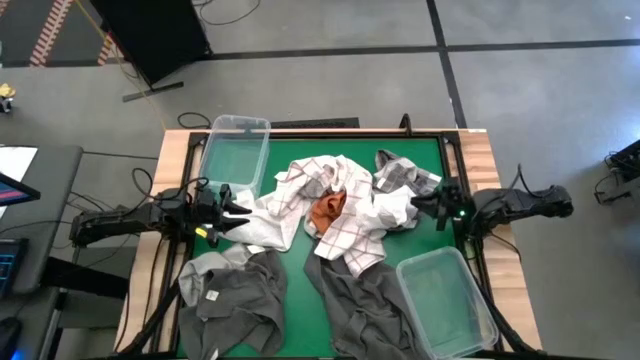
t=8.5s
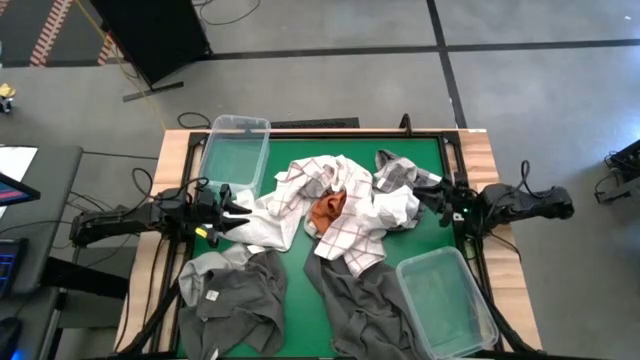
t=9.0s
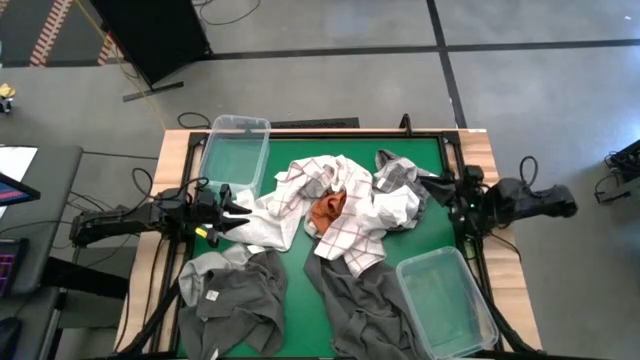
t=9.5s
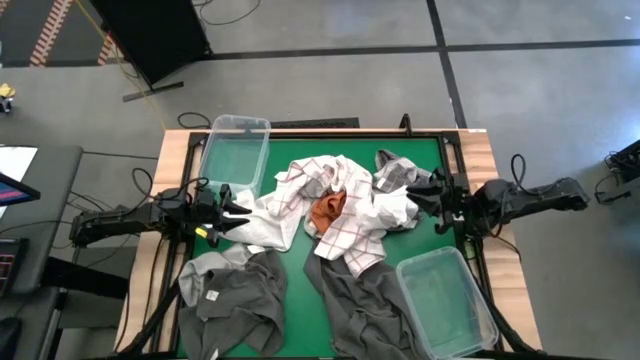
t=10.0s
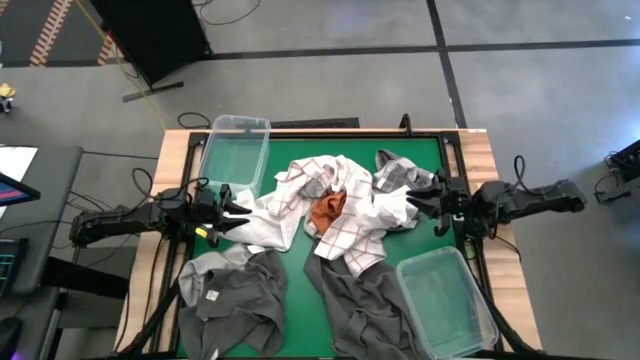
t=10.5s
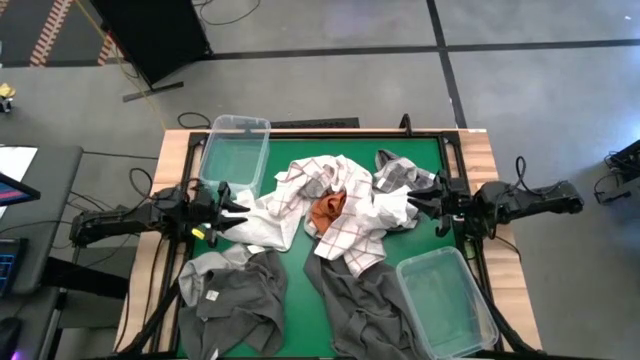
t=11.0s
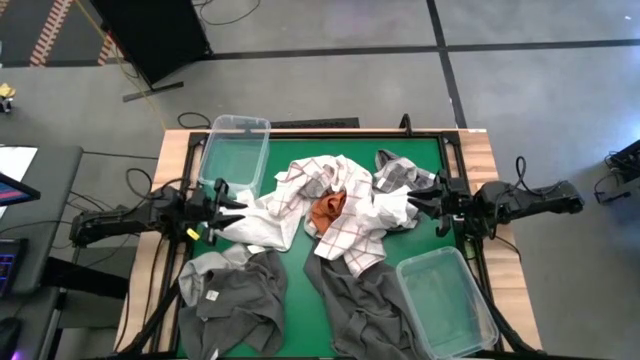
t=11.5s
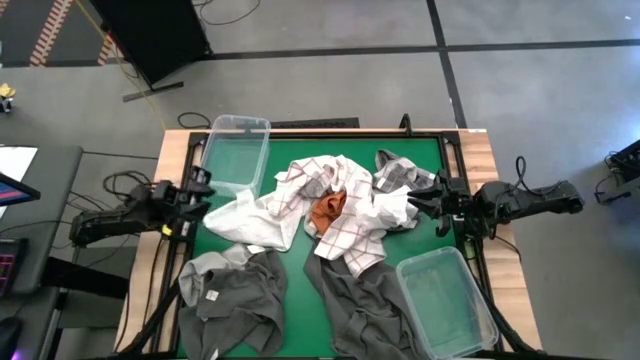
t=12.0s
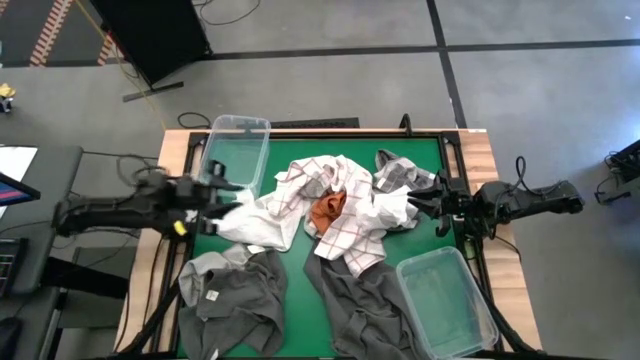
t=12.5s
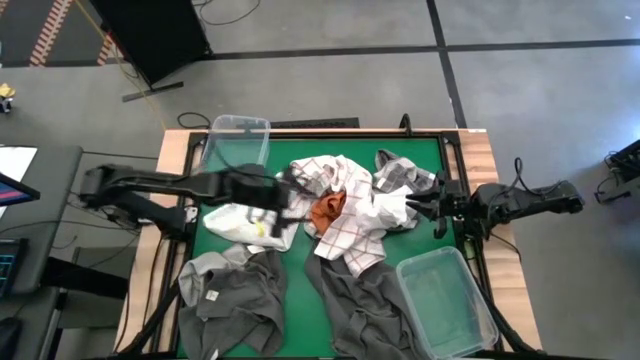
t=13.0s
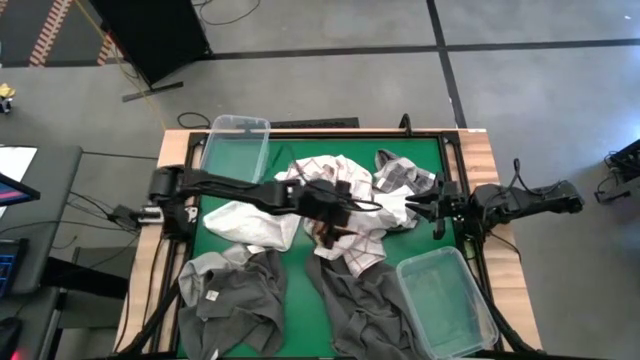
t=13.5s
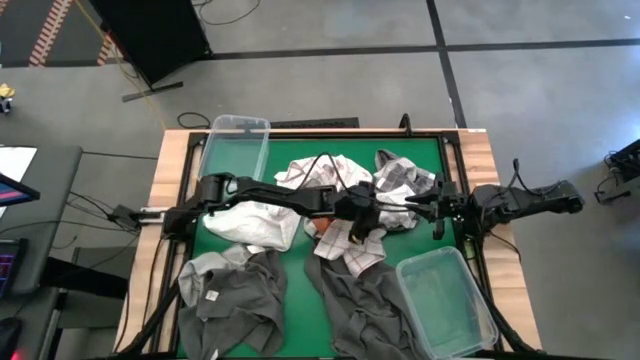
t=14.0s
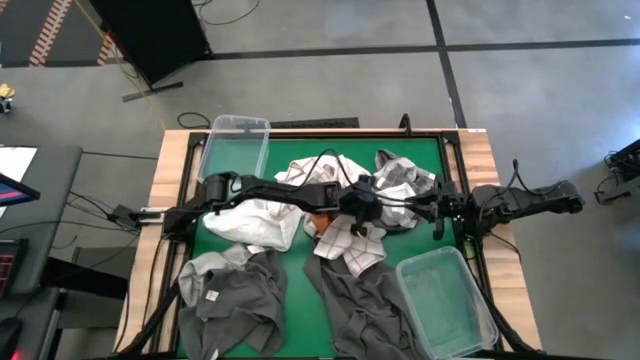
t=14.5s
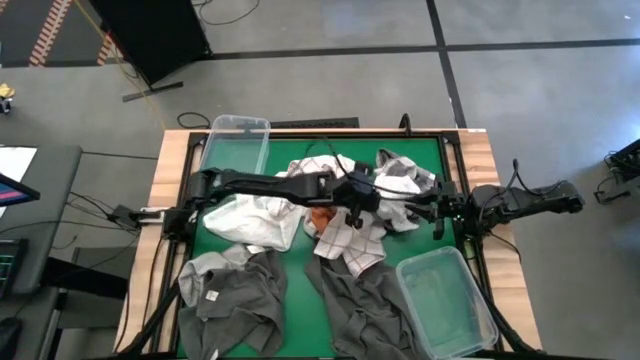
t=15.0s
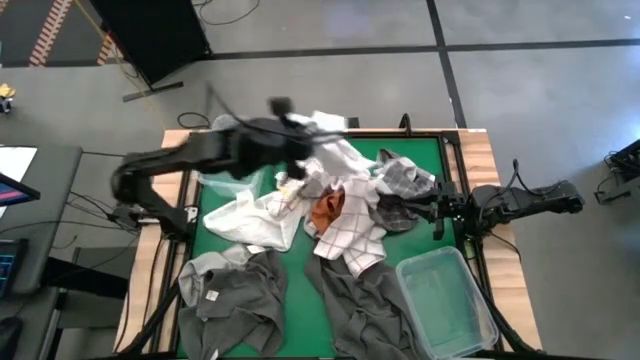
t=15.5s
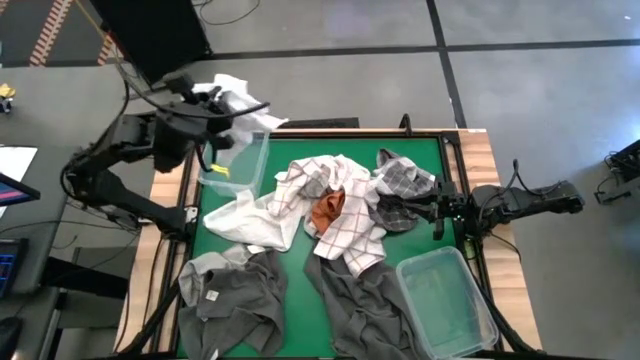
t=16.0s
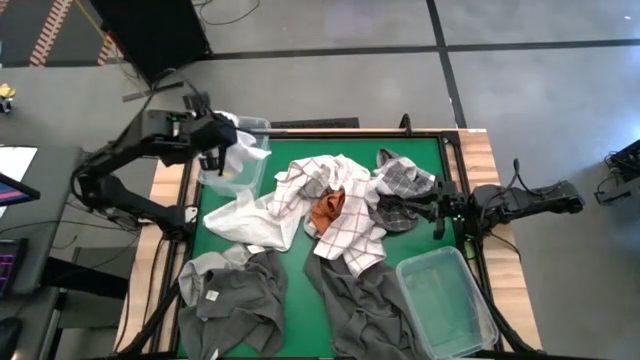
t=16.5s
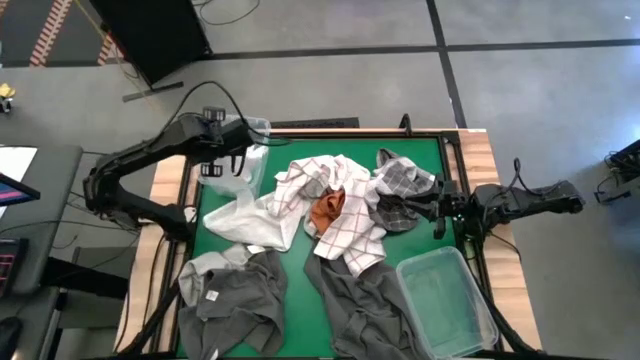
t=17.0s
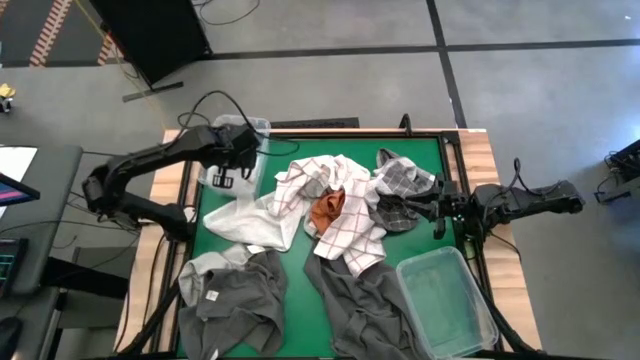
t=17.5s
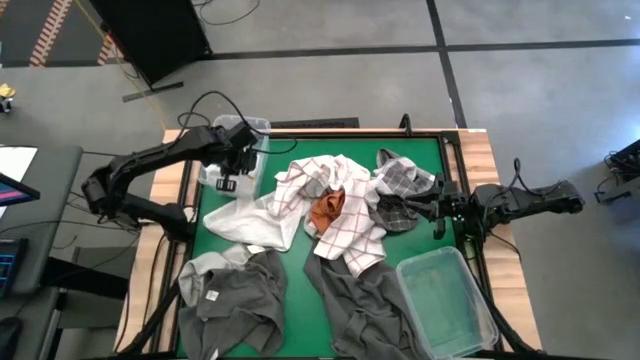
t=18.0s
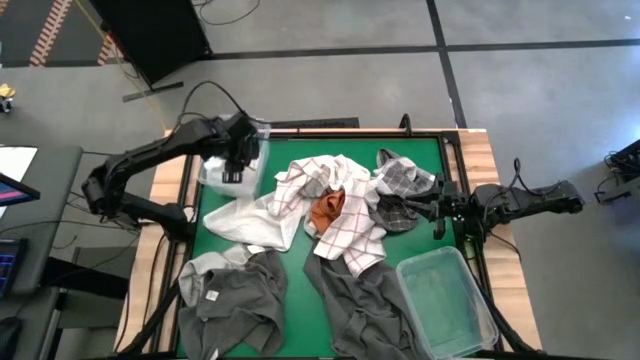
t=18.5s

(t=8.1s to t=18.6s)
Task: Sort towels by color in basket
Put the right white towel into the top transparent bin

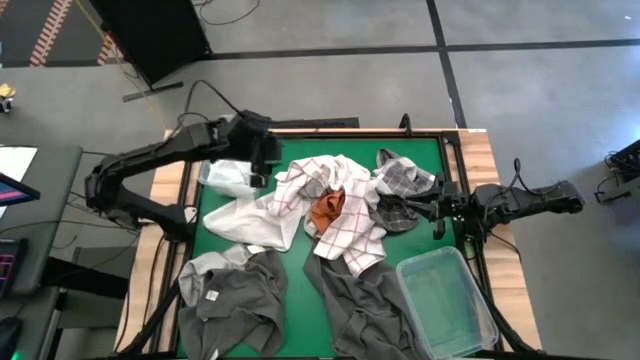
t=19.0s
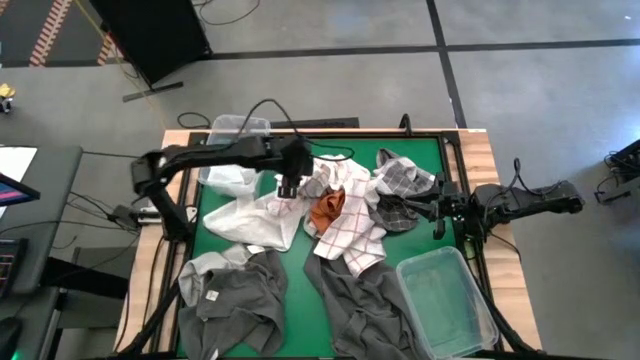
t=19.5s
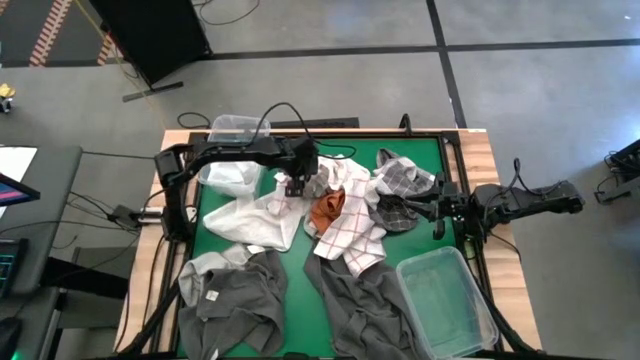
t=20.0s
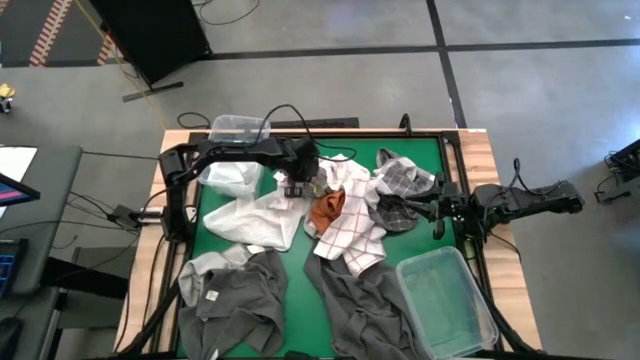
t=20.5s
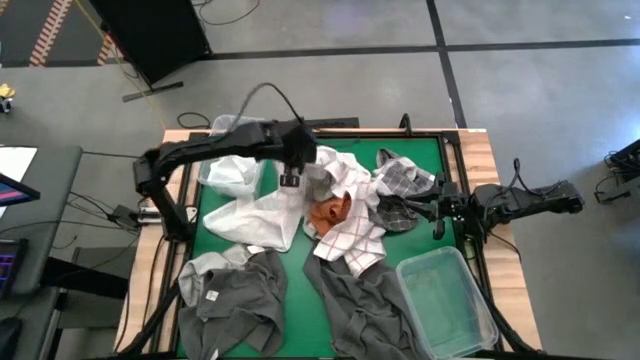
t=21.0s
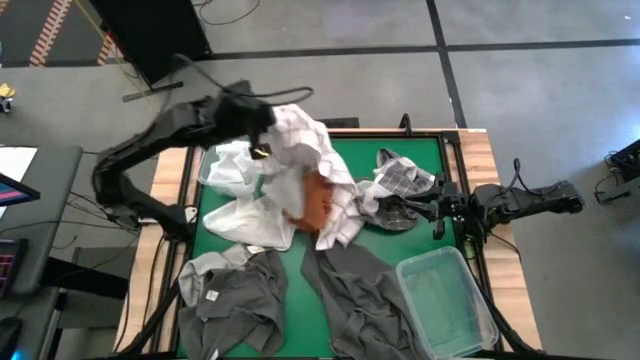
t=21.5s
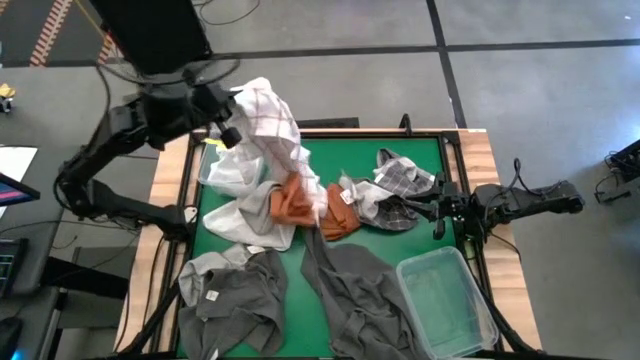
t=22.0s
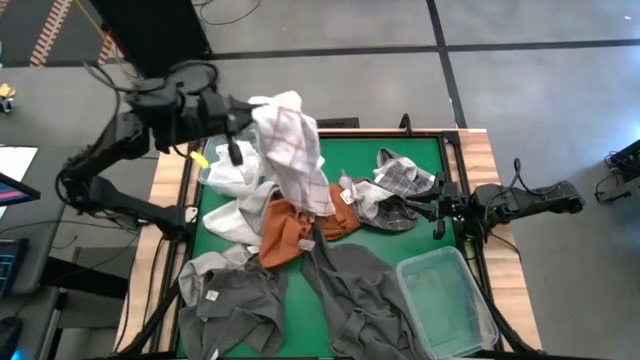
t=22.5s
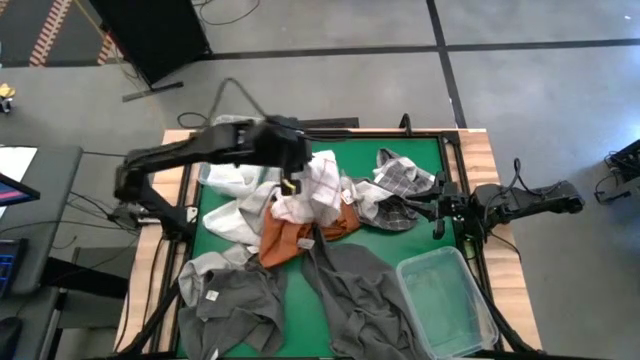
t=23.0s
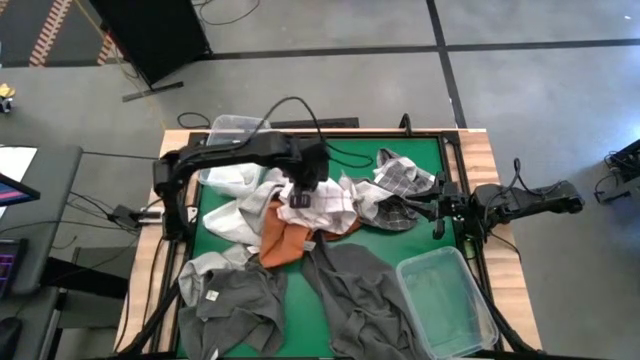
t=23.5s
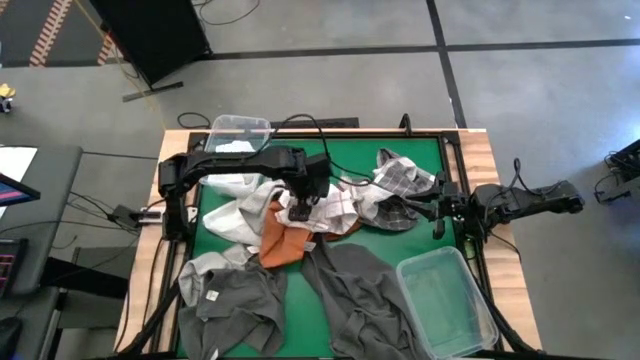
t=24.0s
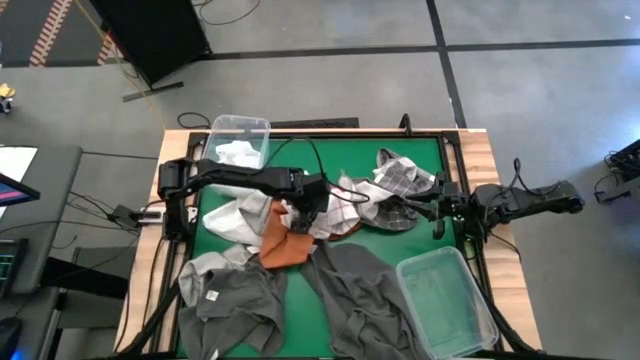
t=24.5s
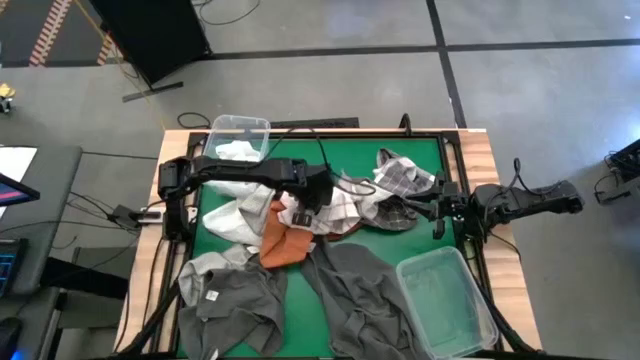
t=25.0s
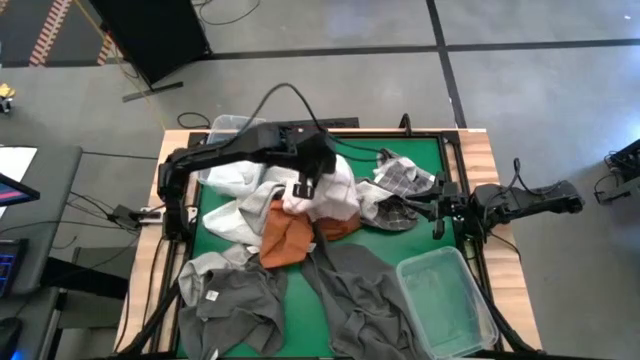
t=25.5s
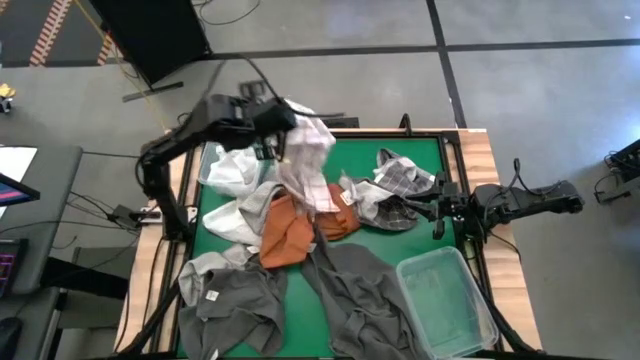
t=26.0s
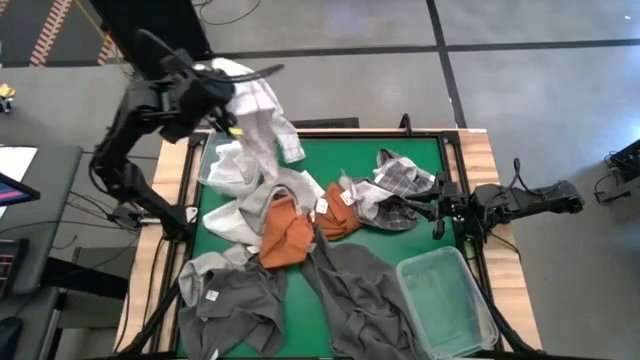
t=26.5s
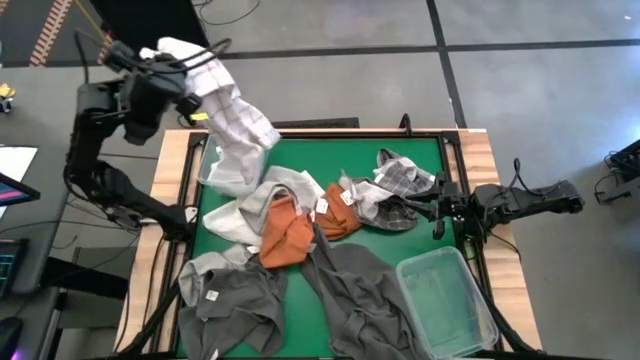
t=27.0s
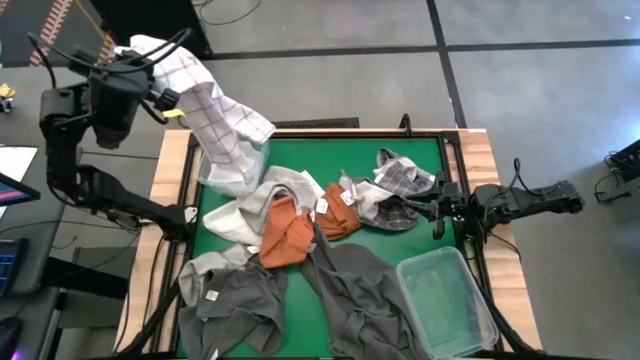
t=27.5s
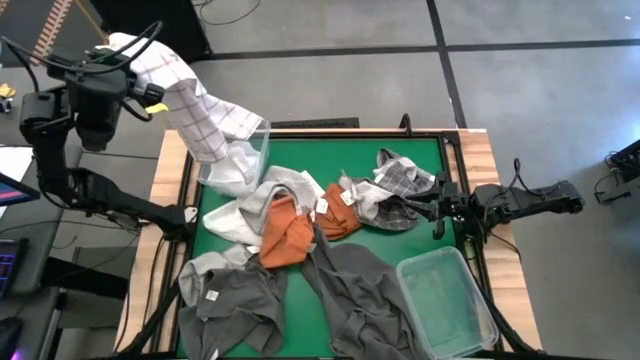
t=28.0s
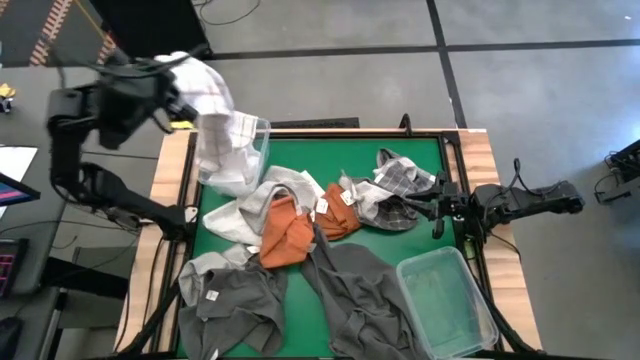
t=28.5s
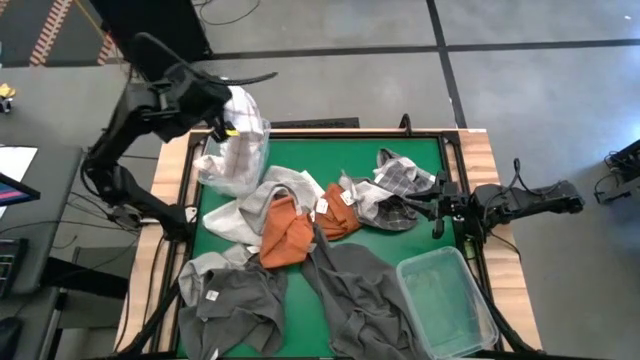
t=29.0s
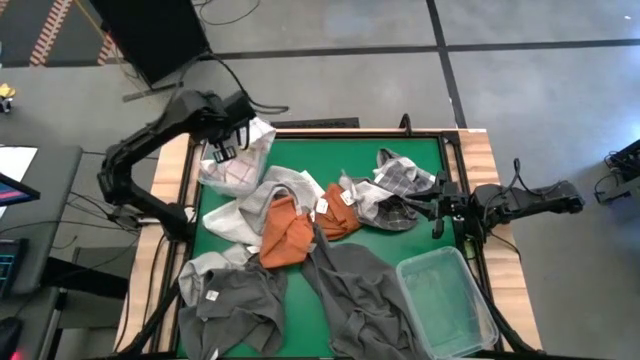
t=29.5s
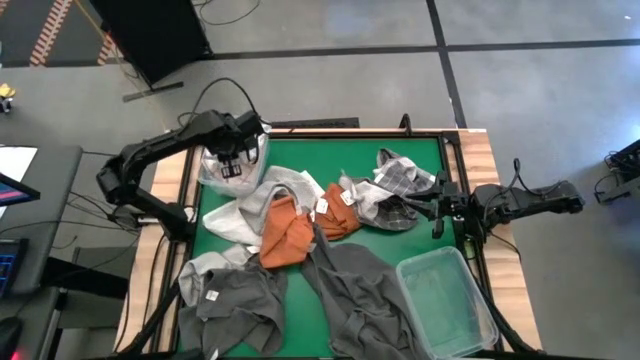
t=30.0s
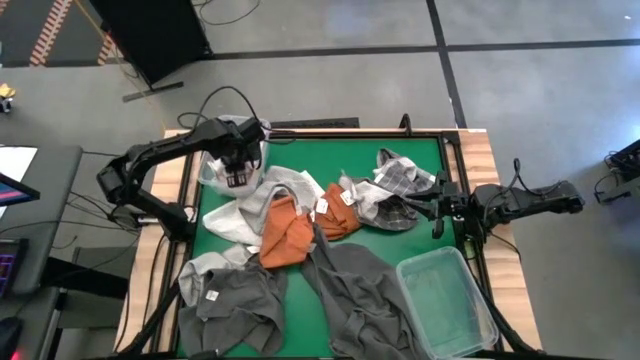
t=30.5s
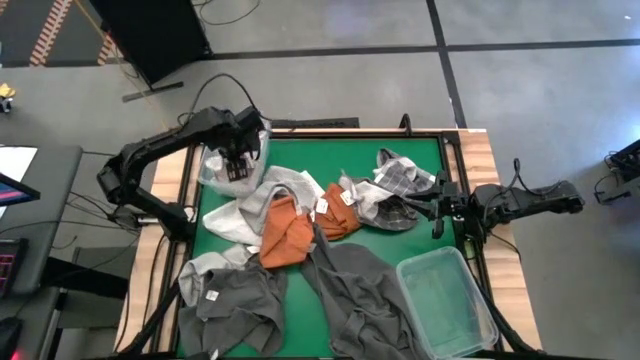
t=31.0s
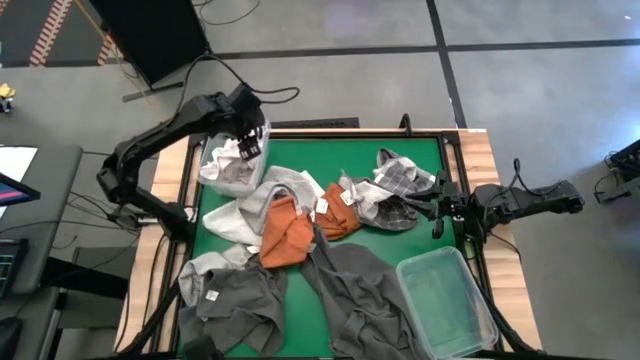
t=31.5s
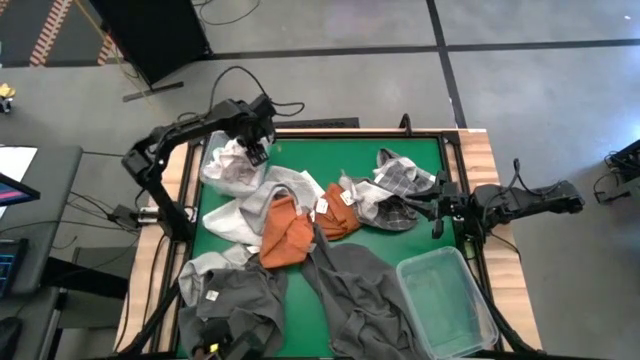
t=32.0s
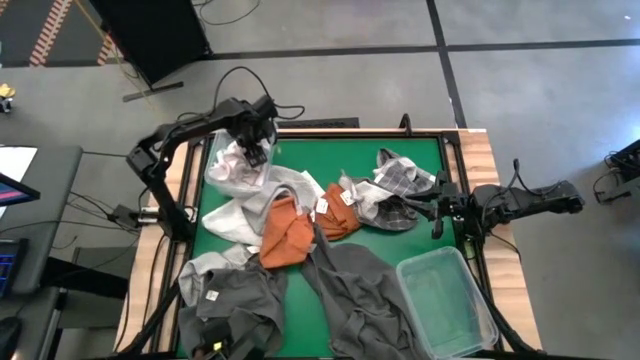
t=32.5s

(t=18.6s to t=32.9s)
Put the white patterned towel into the top transparent bin
